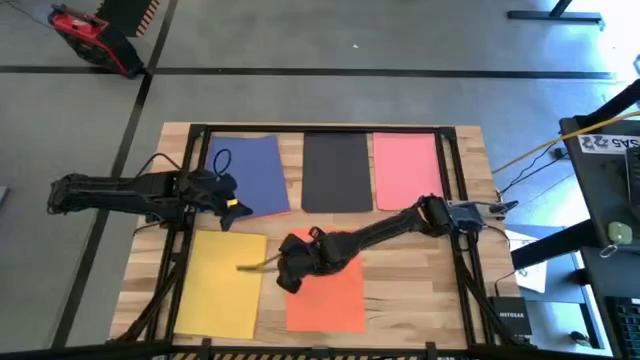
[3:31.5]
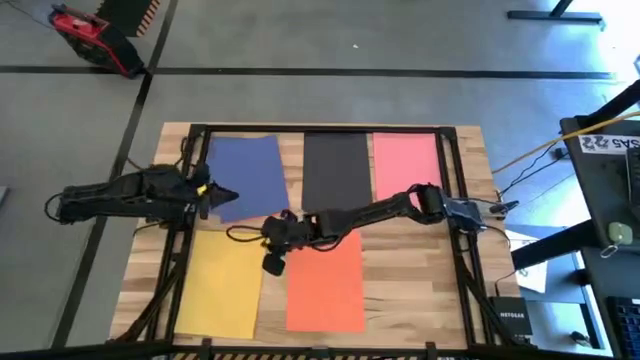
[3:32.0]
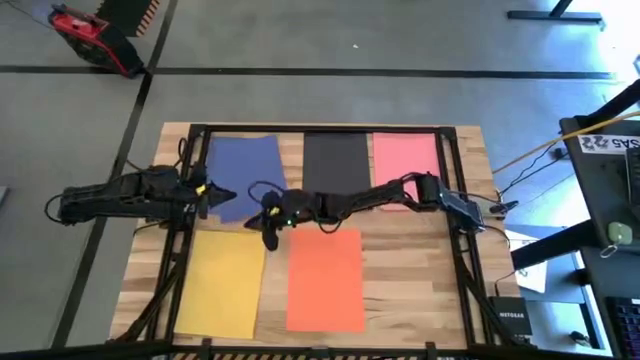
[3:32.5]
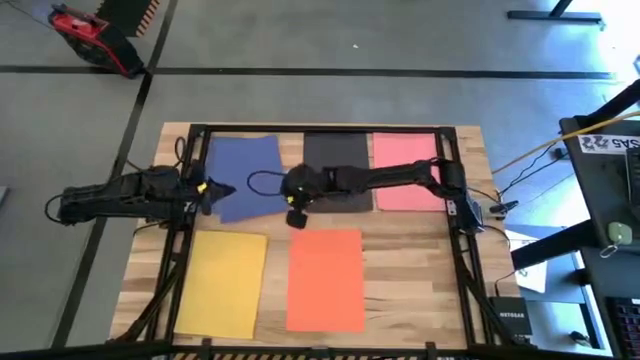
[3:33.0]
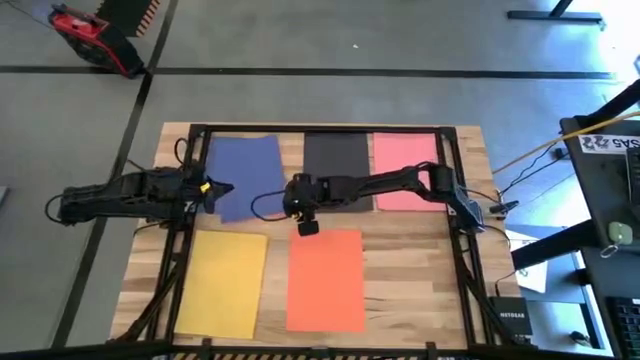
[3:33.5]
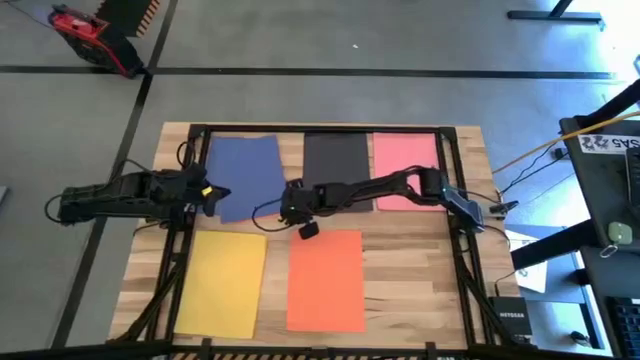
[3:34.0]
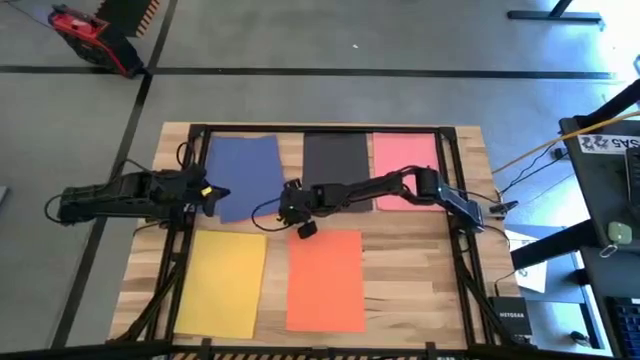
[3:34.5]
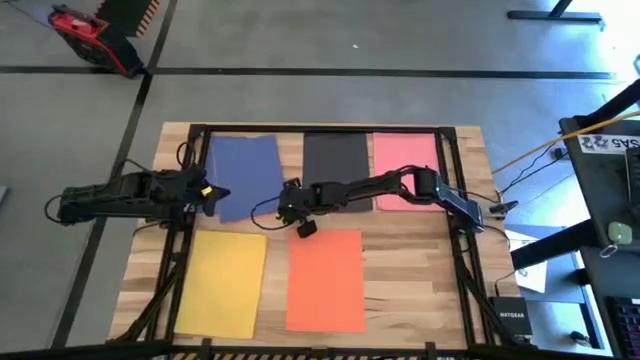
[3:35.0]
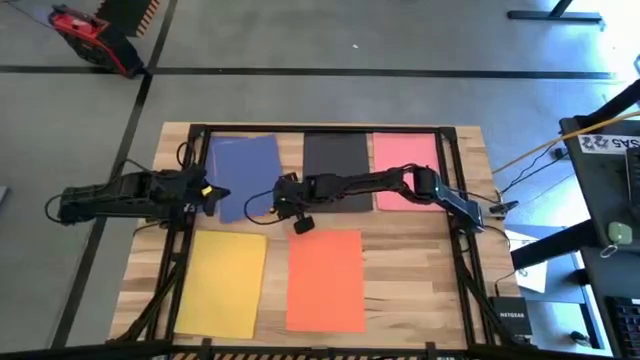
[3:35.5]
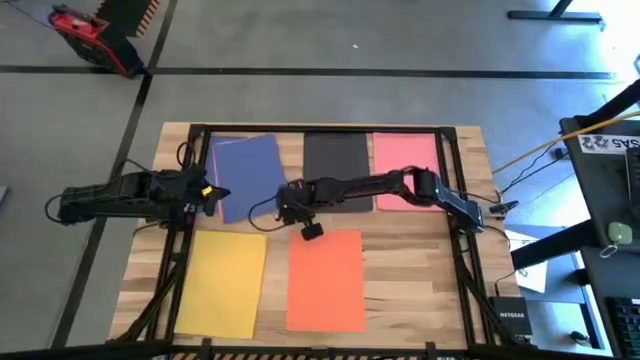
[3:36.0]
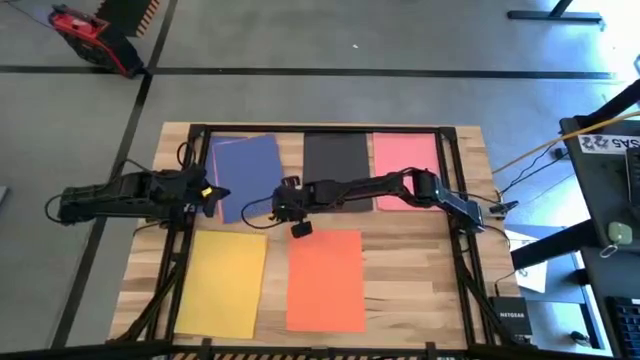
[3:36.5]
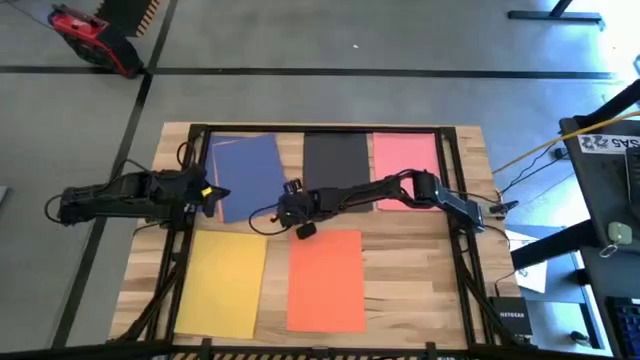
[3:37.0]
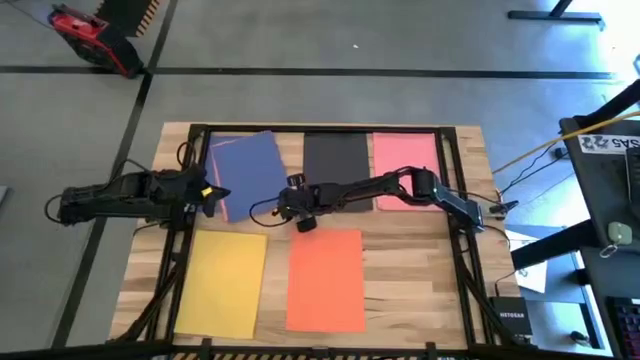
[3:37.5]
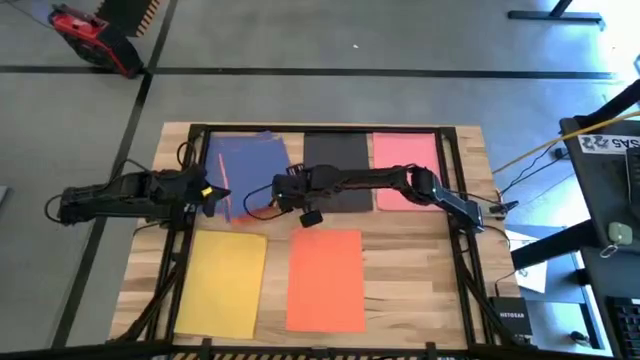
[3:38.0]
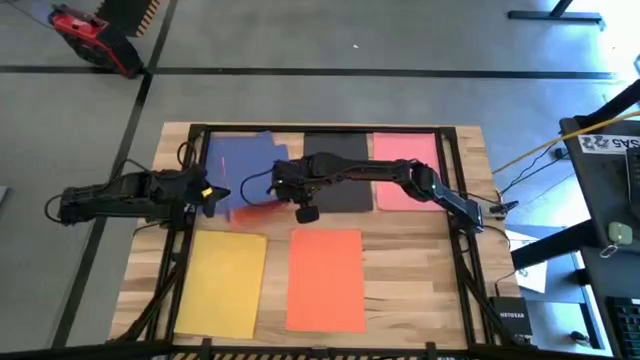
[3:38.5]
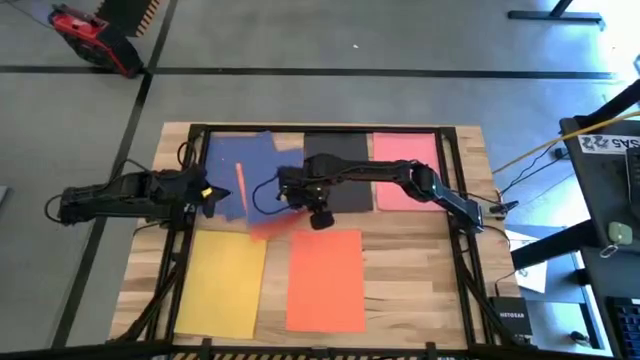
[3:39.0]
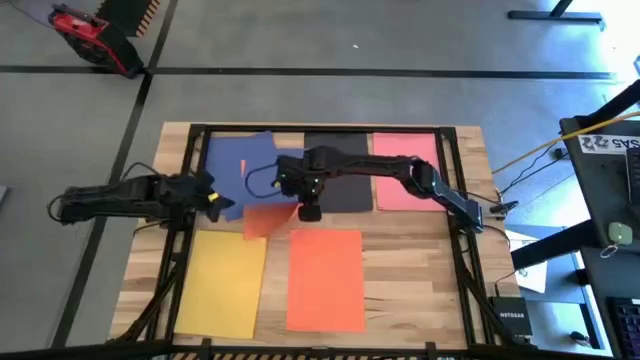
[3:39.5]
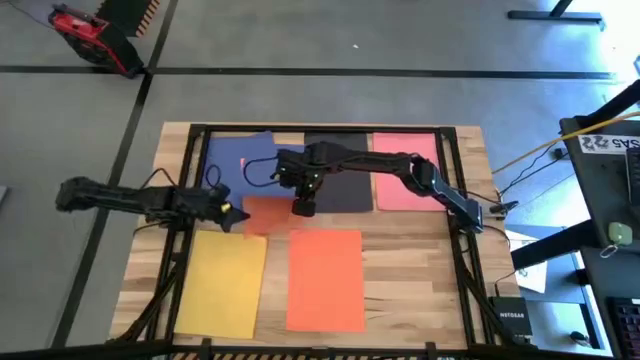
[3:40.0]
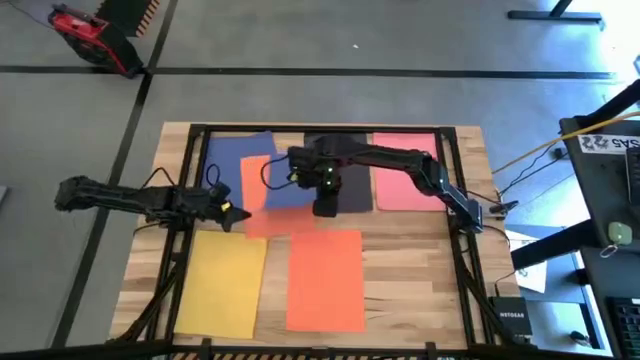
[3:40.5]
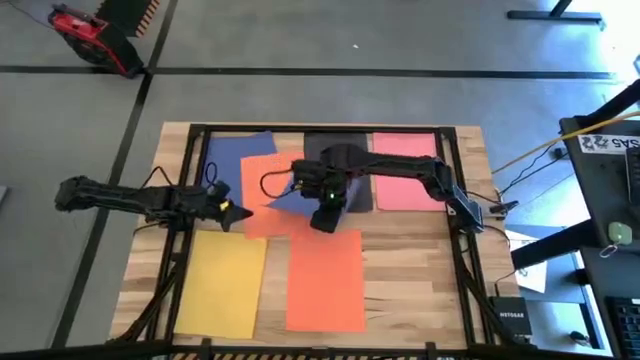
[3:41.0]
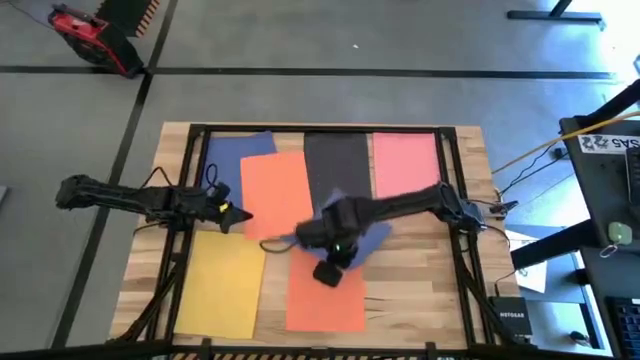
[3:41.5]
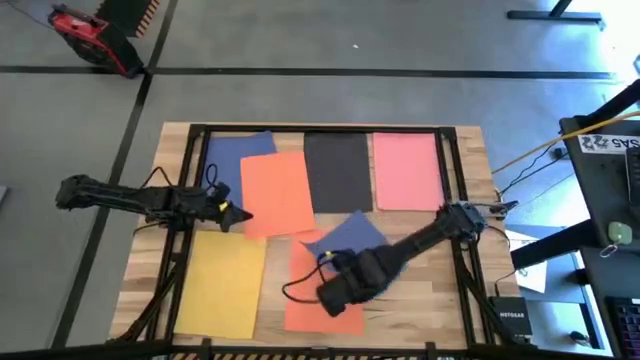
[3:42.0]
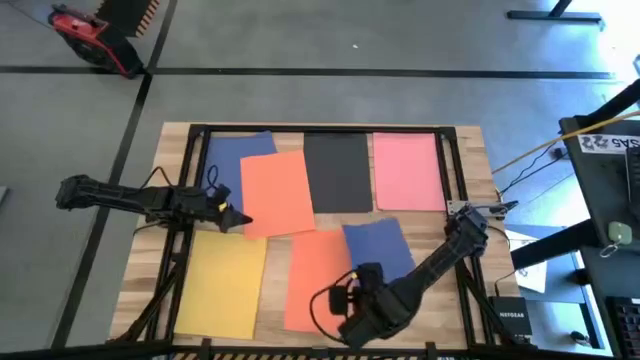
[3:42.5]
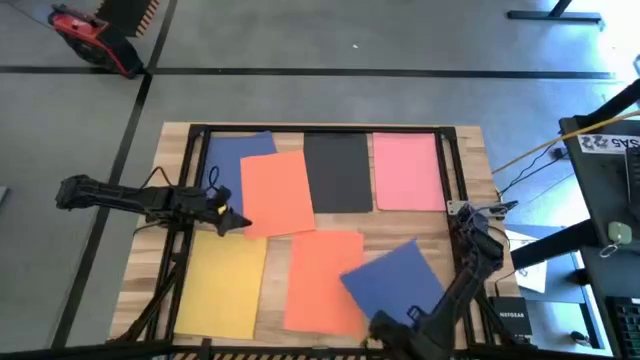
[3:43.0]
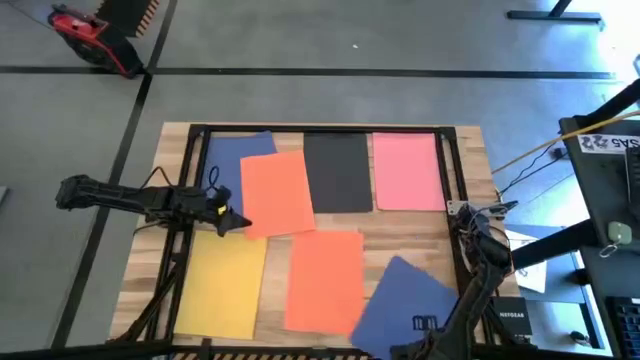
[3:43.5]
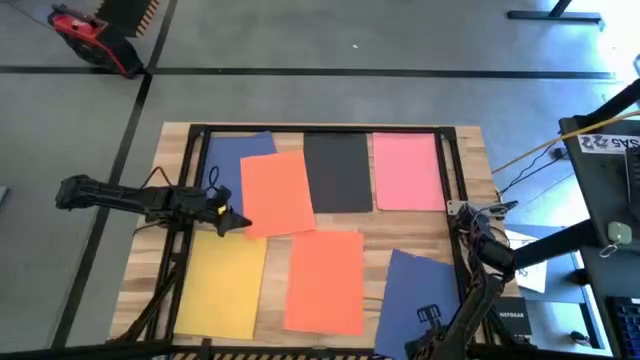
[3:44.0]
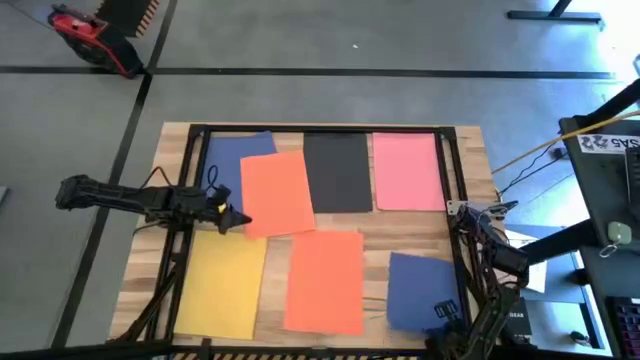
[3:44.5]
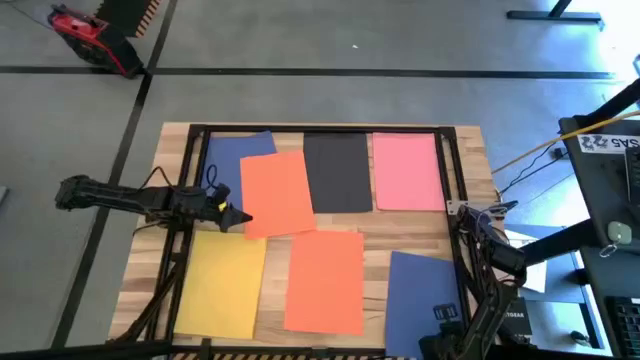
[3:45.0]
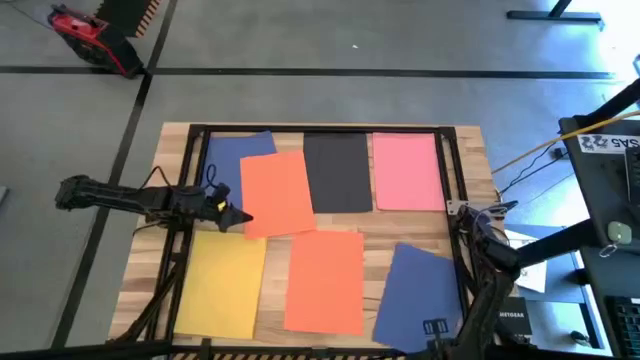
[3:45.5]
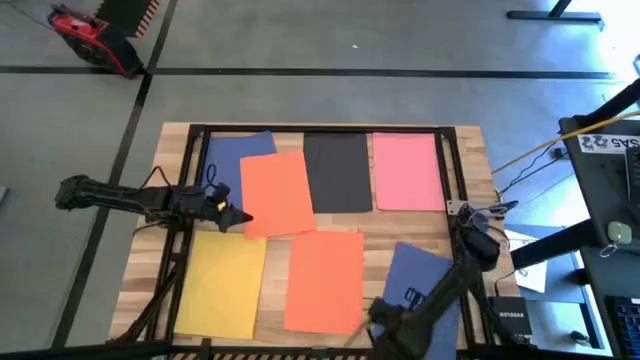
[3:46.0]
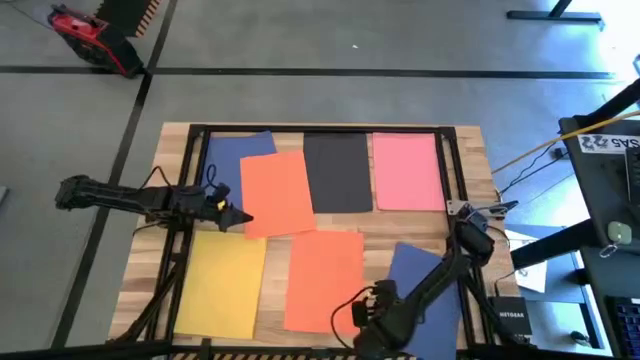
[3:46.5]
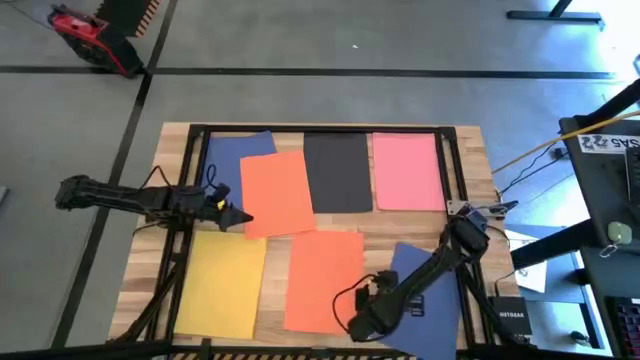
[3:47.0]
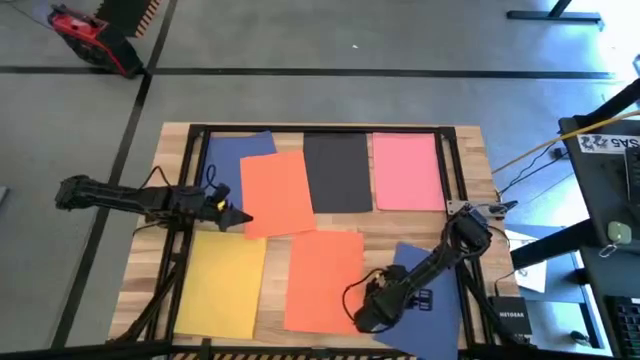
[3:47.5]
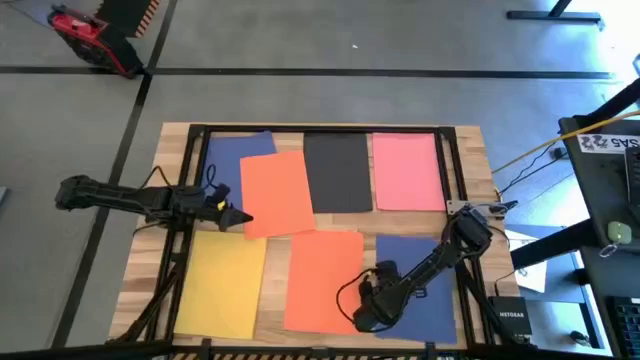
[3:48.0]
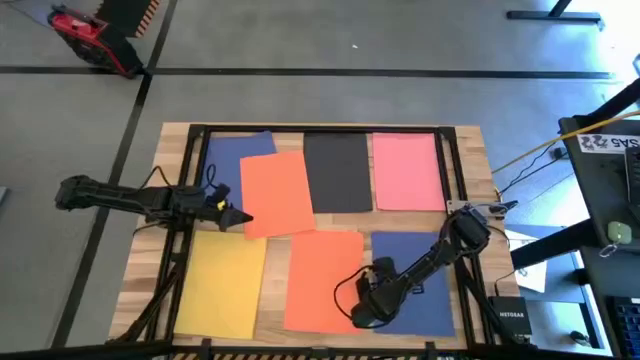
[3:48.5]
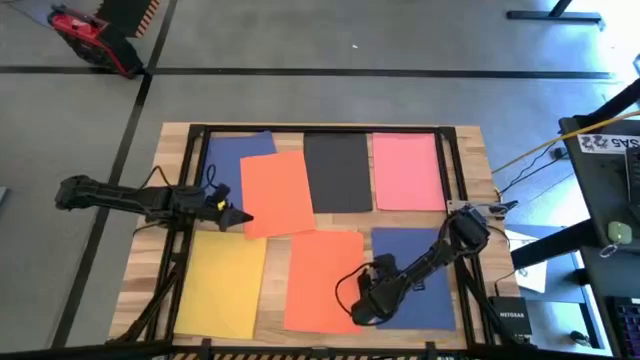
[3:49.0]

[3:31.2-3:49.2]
Task: Organize paper
Move the blue paper to the bottom right of the table

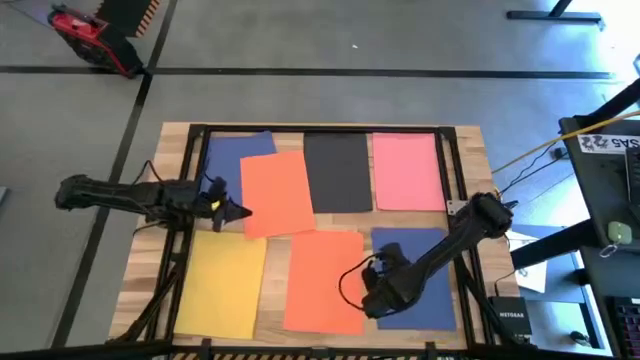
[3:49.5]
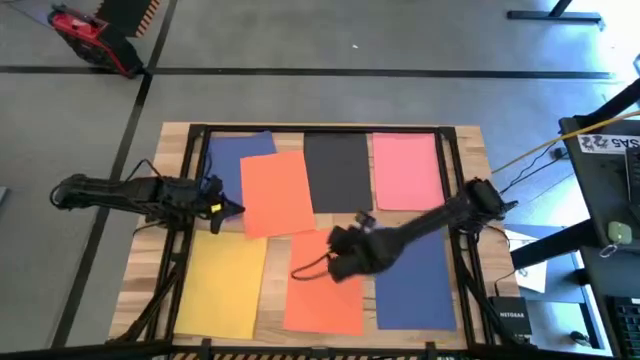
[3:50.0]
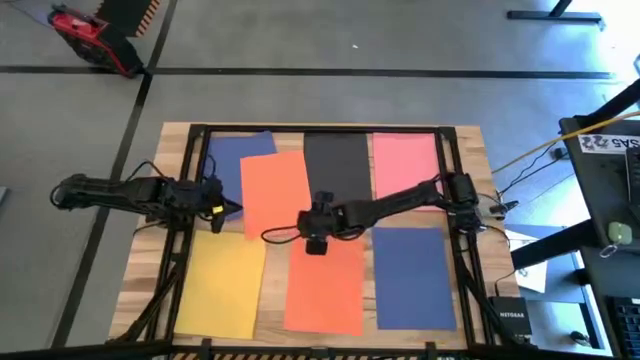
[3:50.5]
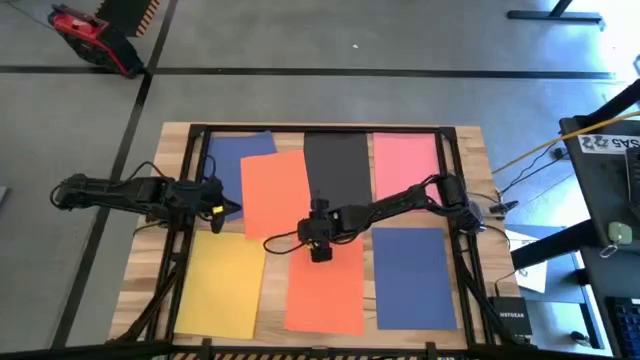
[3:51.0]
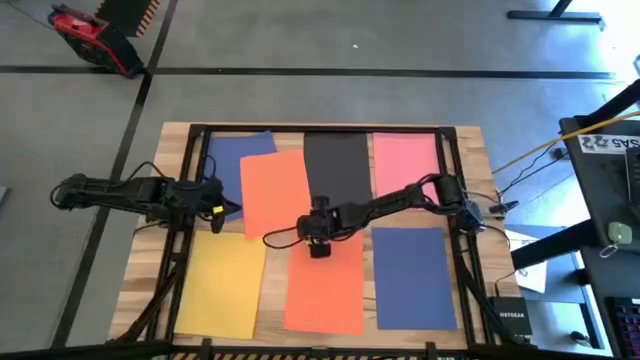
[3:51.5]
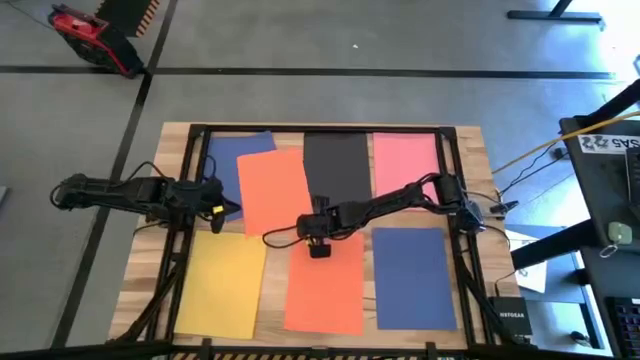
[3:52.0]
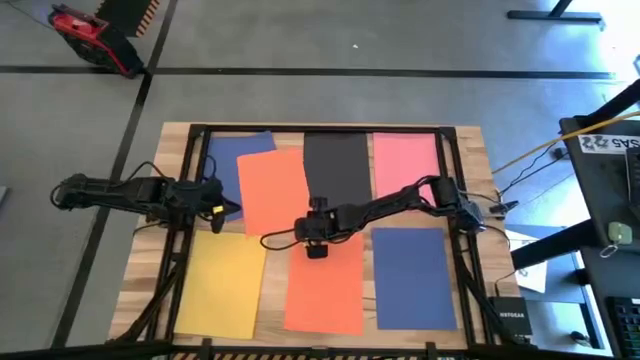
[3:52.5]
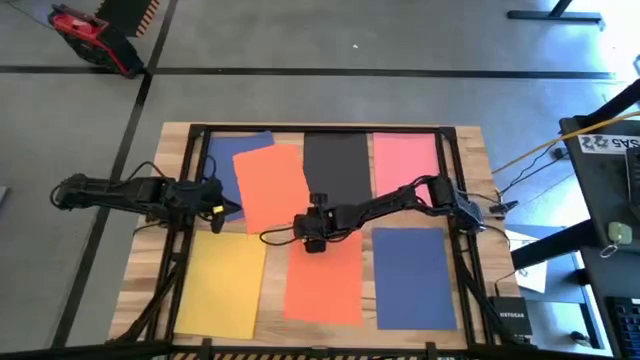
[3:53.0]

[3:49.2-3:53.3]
Stack the orange paper on top of the other orange paper

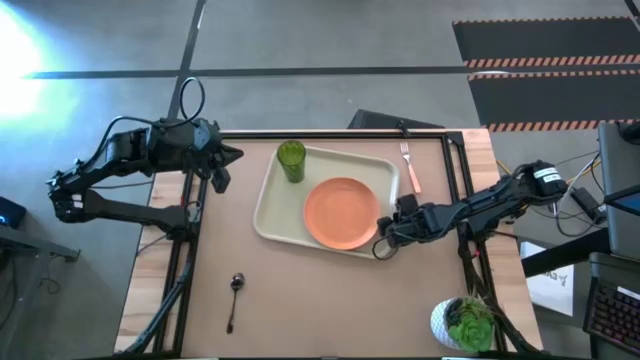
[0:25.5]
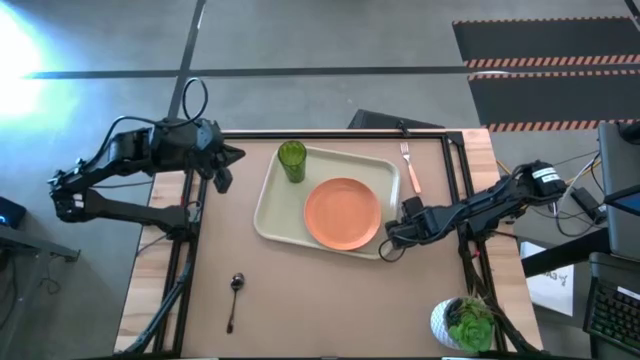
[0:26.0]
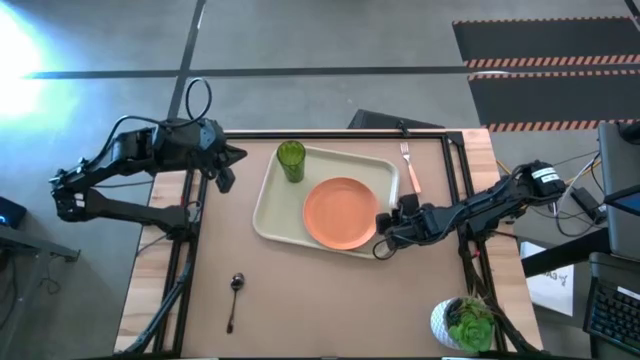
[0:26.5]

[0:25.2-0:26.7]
Task: Pick and place plate/cup/fork/spoon on tray
Adjust the light brown serving tray

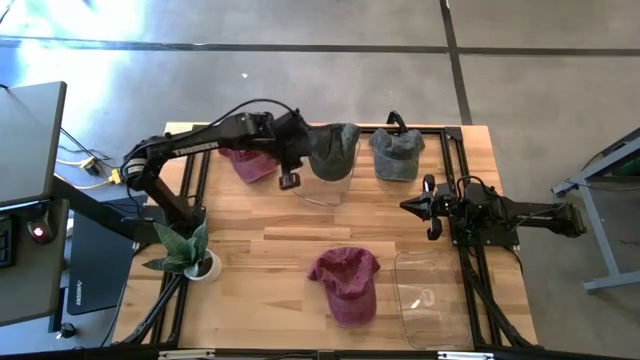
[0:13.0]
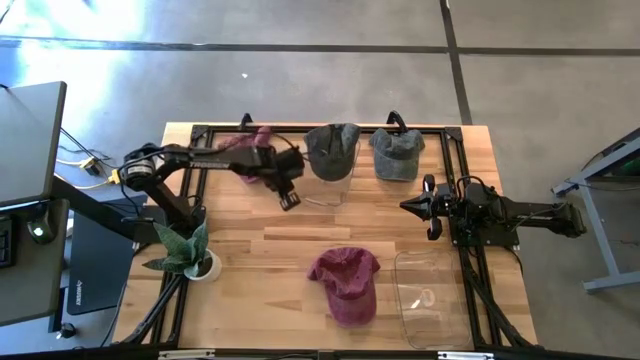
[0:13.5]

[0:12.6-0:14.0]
Task: Pick & Place hat
Adjust the top transparent bin
